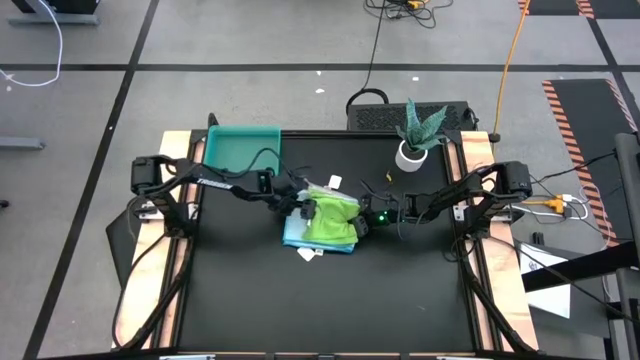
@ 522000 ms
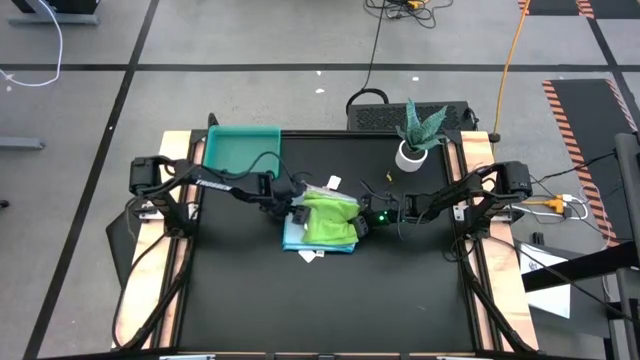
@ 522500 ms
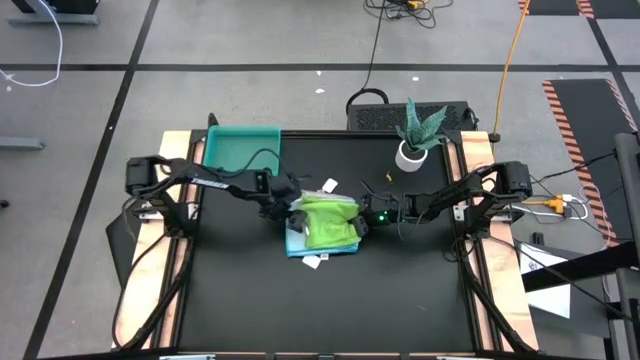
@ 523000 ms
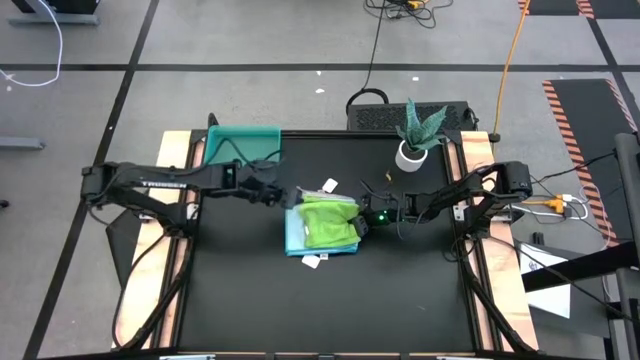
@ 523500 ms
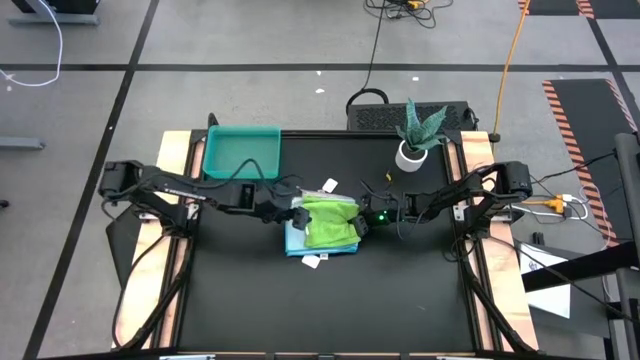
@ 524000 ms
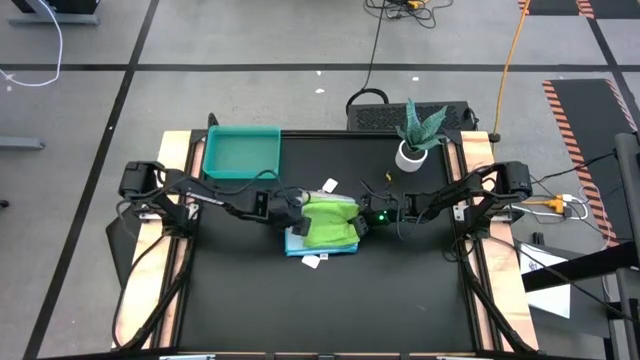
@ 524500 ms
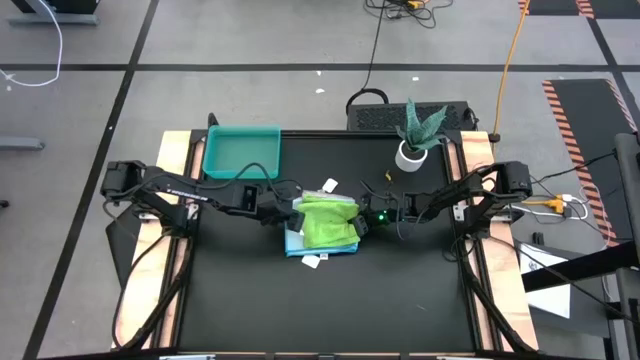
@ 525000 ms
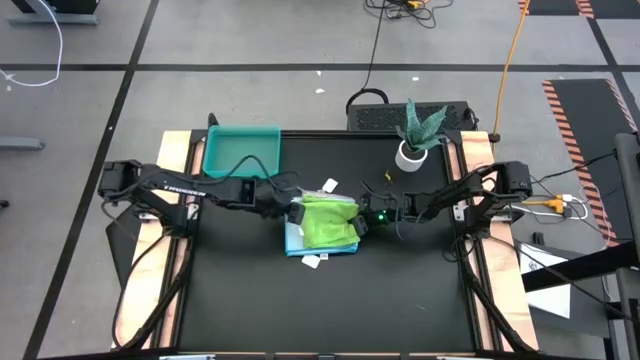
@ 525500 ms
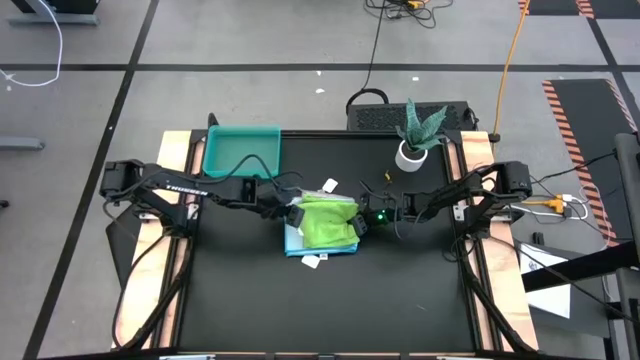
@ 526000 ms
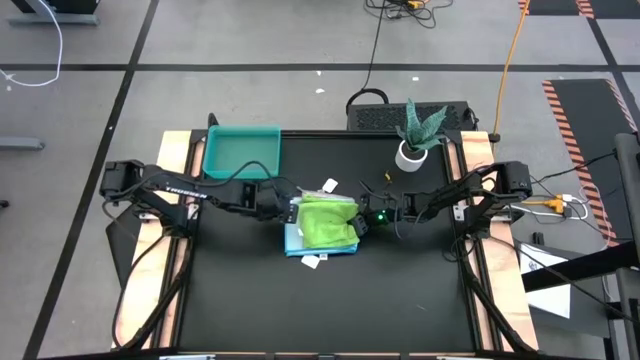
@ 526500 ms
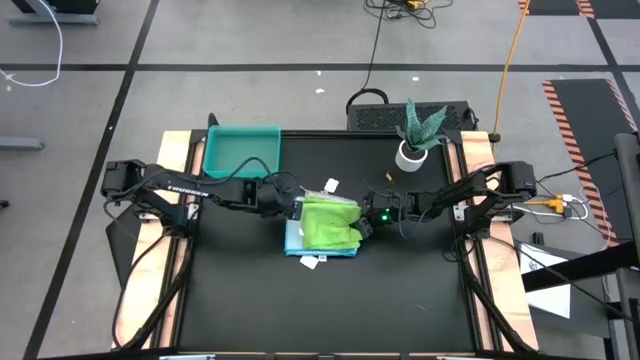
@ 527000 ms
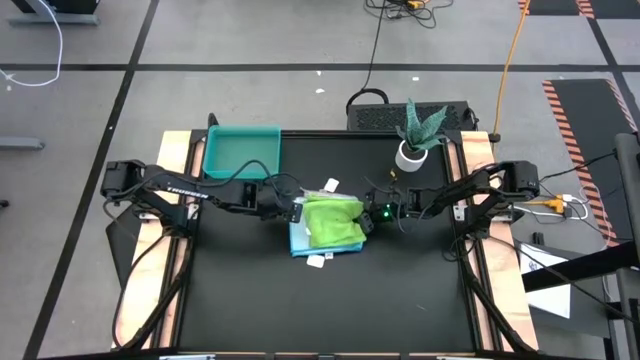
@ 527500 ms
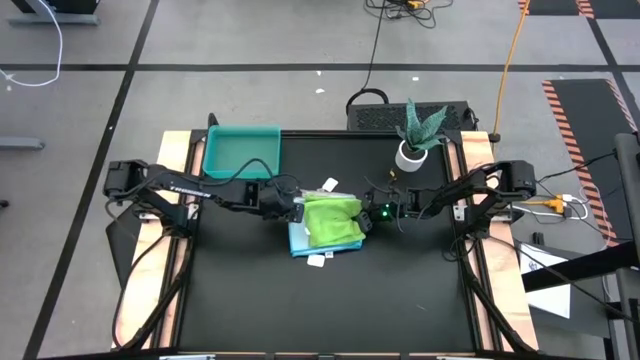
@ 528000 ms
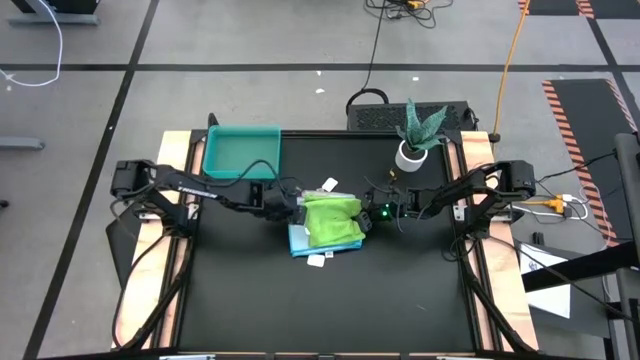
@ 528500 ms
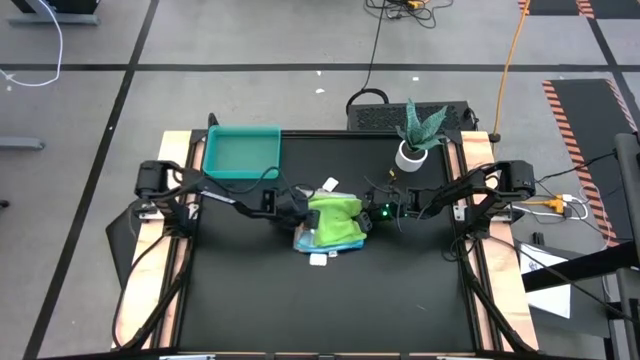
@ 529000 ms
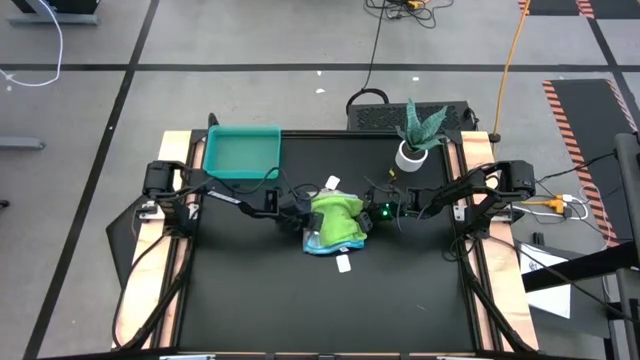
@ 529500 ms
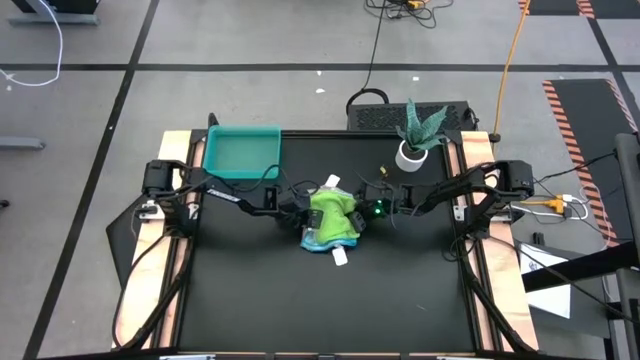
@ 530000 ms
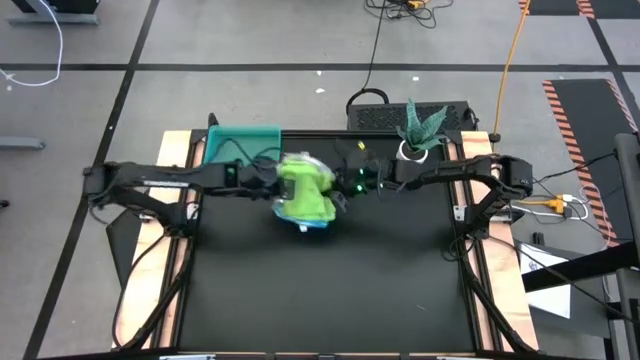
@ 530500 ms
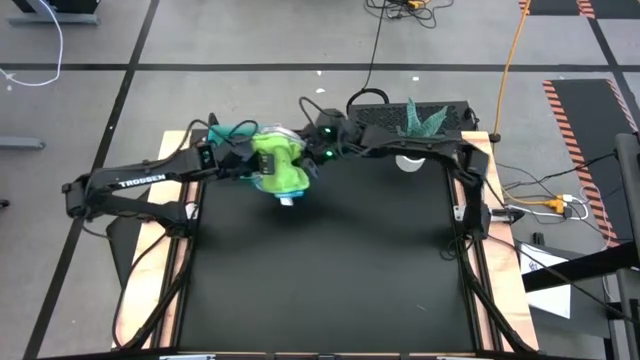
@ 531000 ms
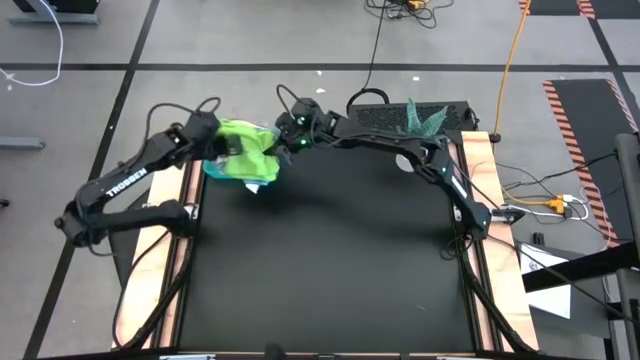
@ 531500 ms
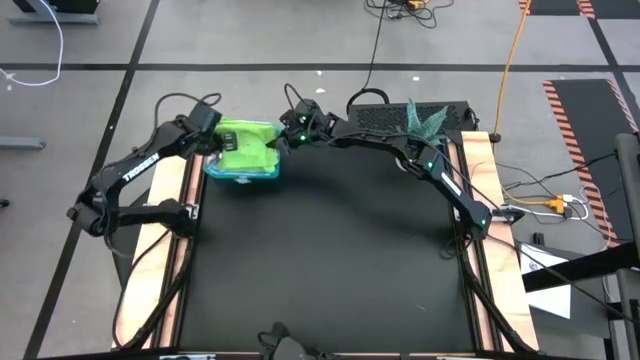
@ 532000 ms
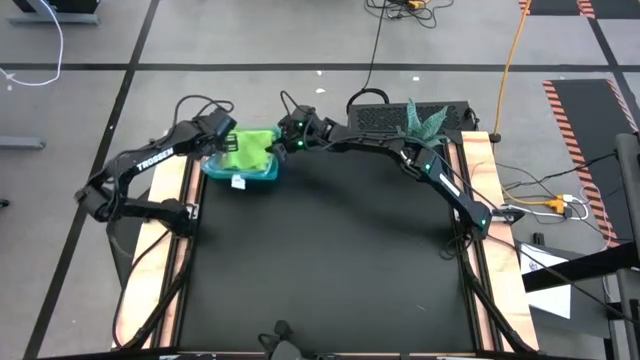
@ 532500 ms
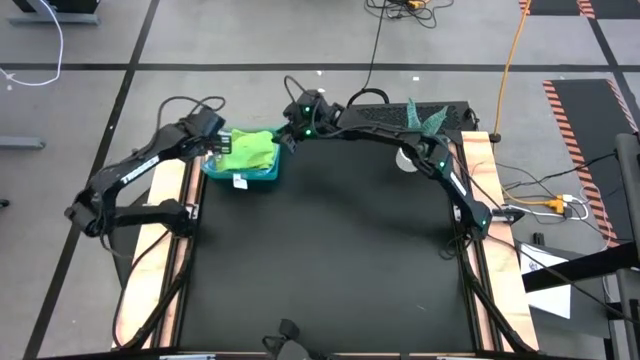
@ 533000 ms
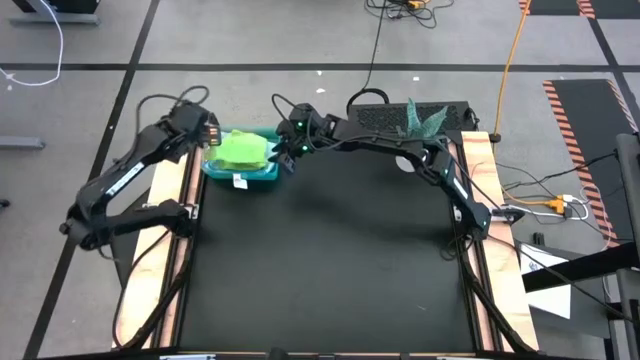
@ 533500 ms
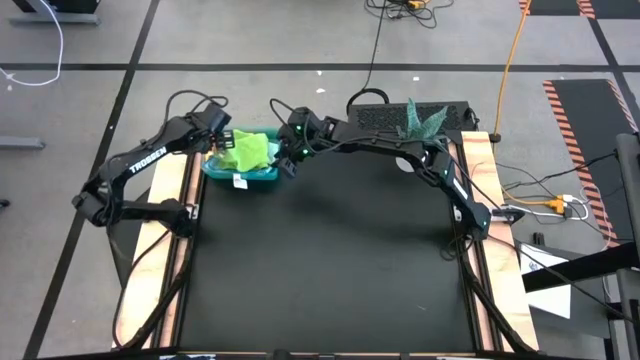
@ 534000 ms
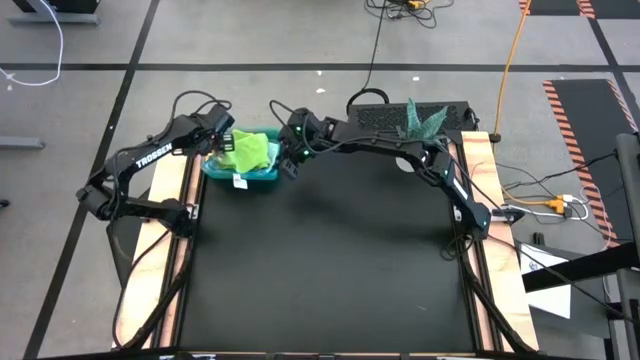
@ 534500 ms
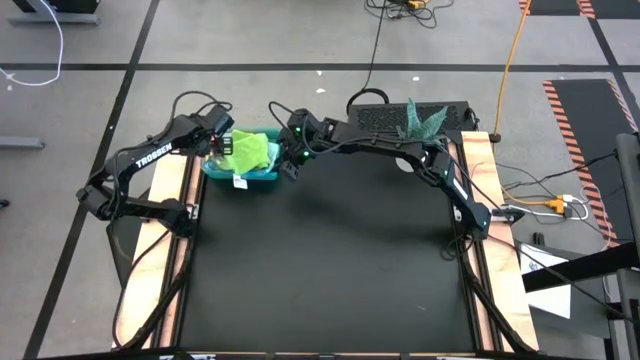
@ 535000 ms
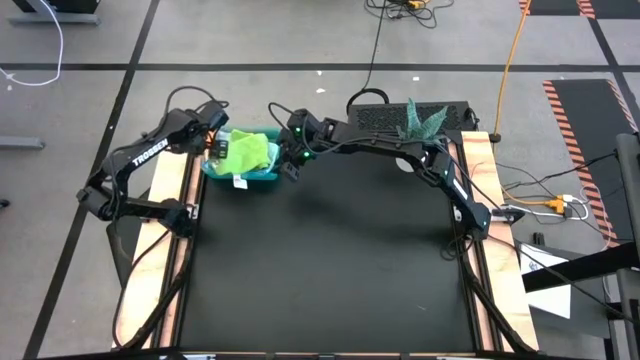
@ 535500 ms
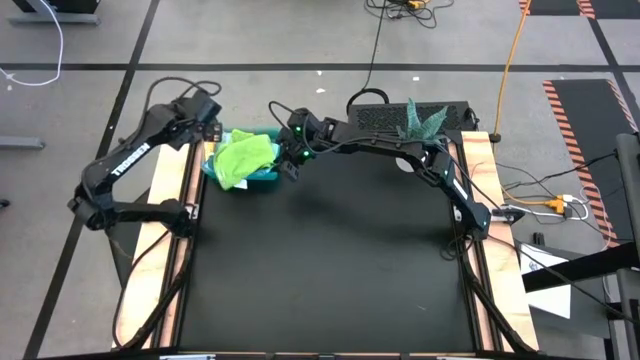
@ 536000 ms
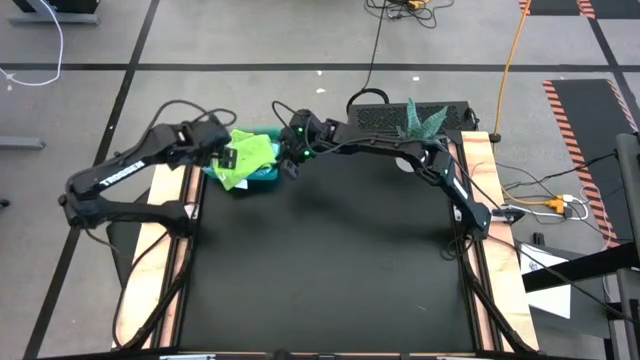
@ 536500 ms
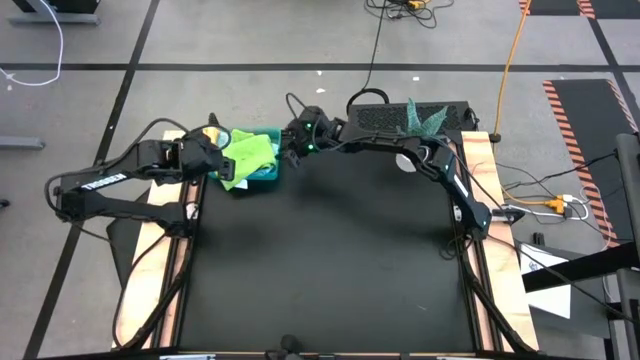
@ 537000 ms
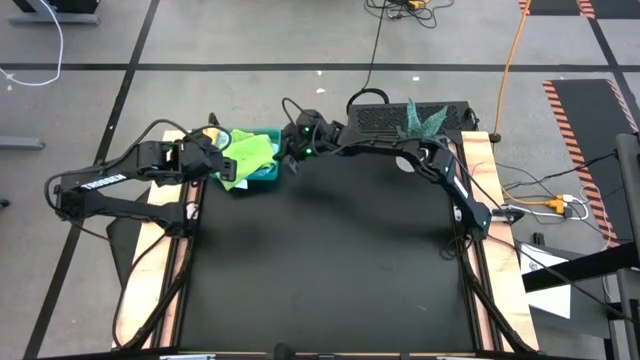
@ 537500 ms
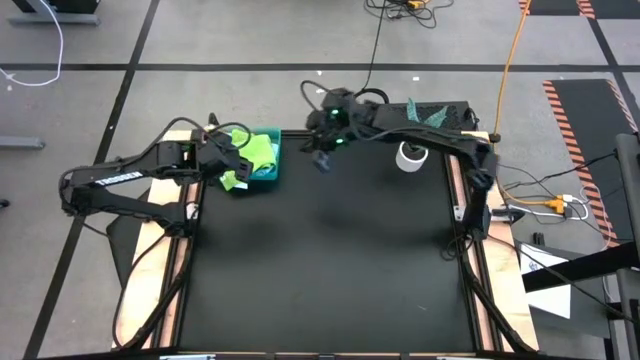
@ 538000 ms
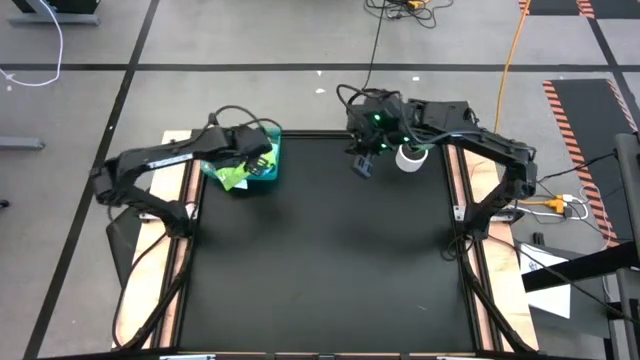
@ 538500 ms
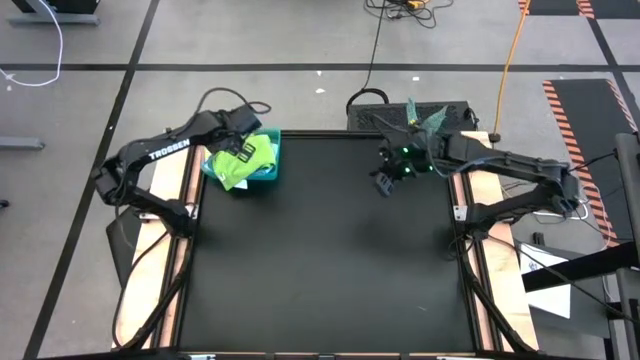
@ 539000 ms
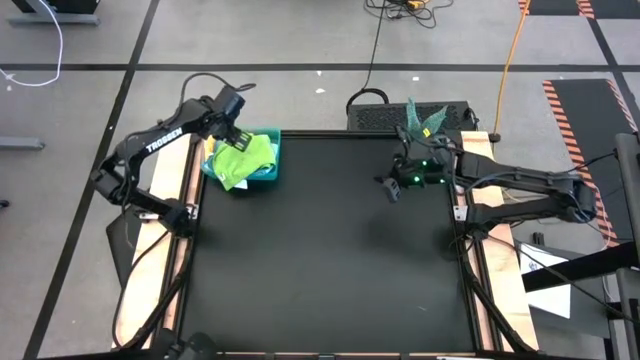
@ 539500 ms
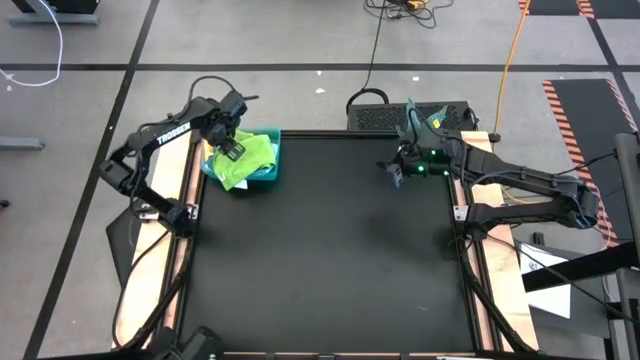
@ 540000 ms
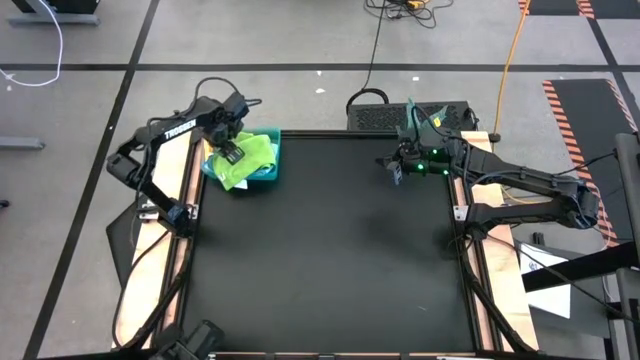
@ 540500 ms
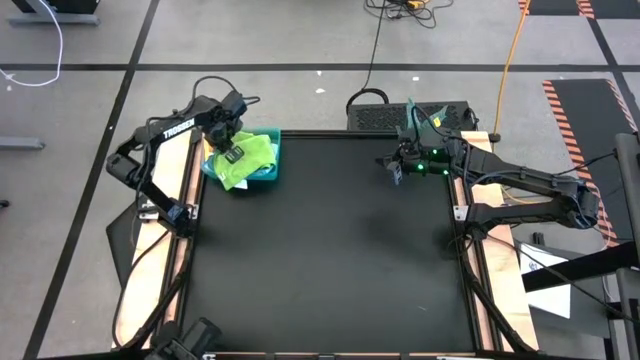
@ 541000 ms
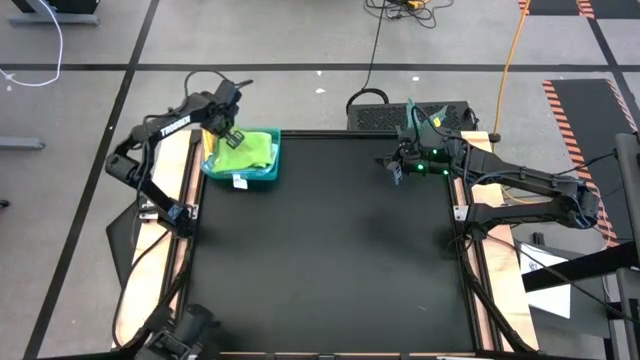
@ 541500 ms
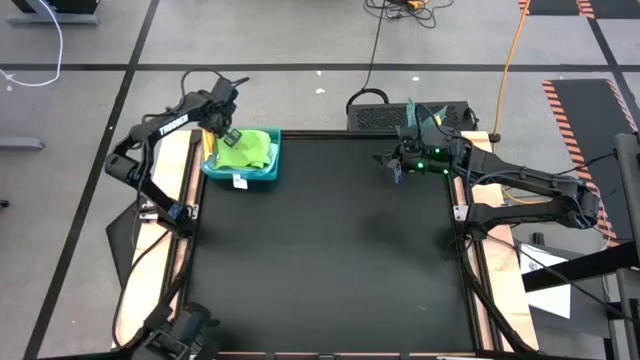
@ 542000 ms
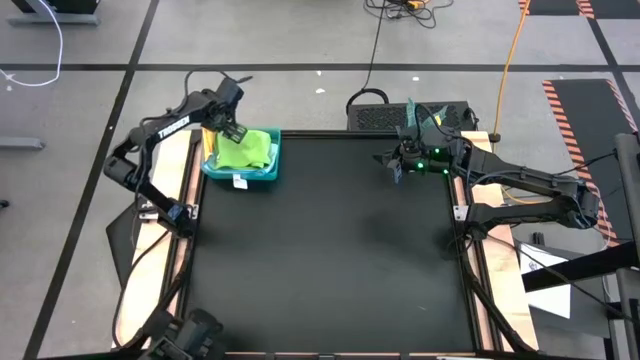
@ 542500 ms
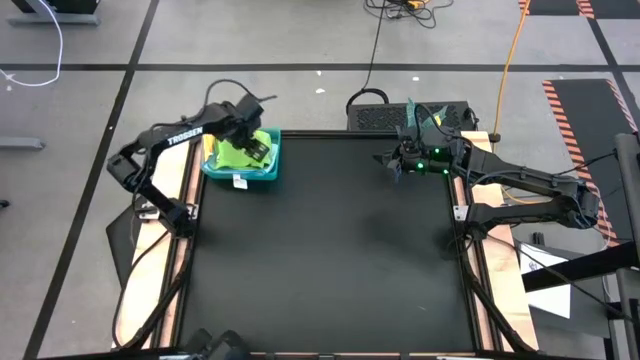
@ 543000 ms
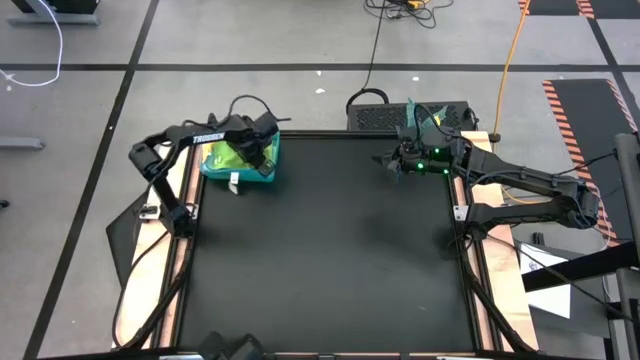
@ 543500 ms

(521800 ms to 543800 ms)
Task: Fold microfiber towels
Put the stack of folded microfiber towels in the blue bin
